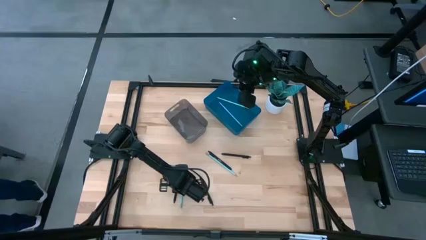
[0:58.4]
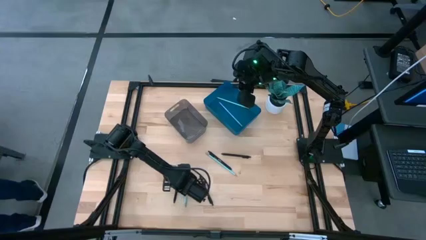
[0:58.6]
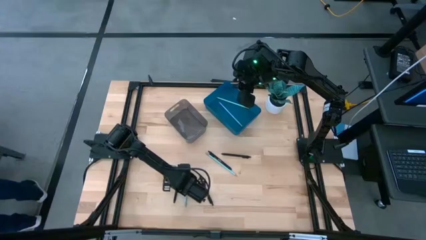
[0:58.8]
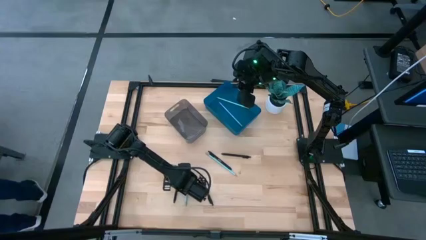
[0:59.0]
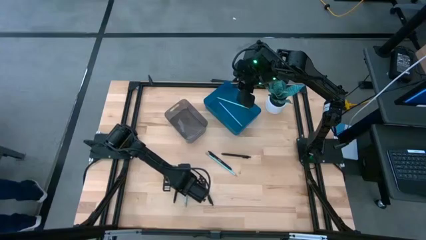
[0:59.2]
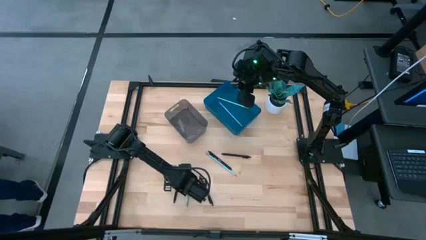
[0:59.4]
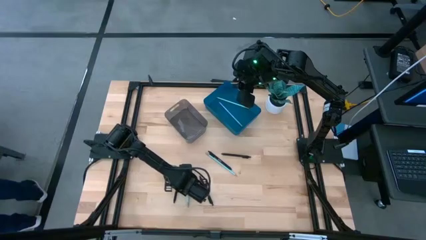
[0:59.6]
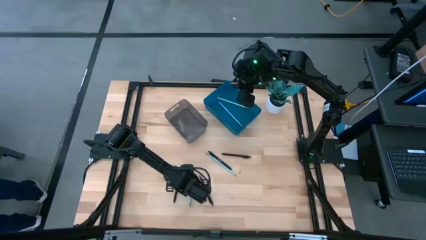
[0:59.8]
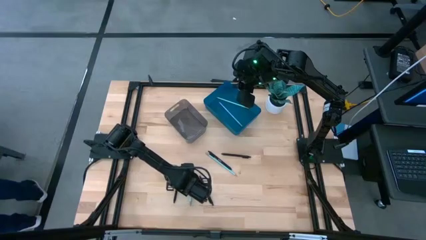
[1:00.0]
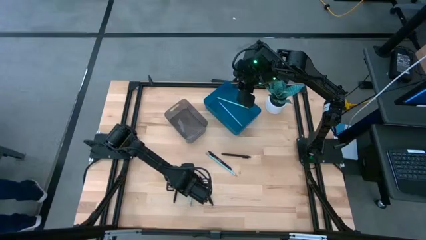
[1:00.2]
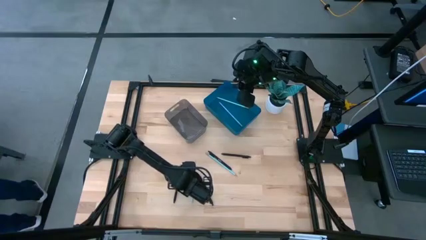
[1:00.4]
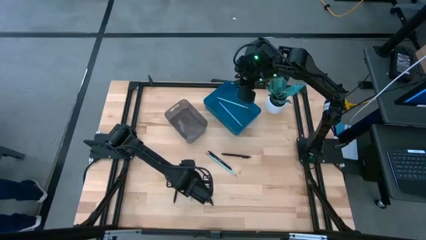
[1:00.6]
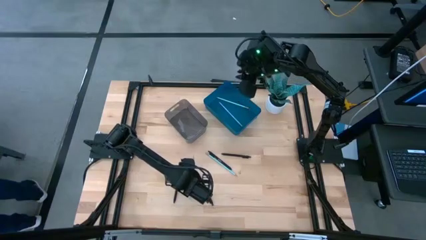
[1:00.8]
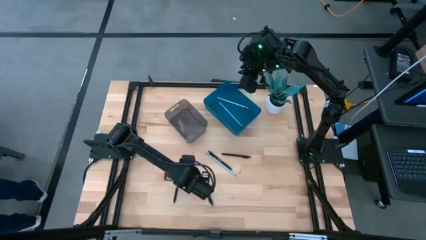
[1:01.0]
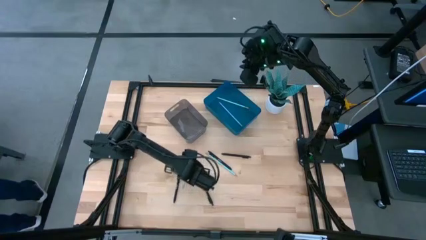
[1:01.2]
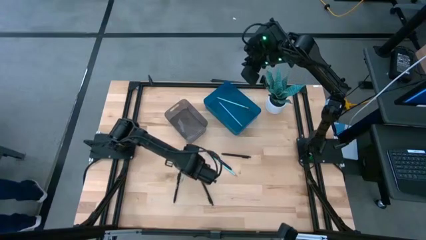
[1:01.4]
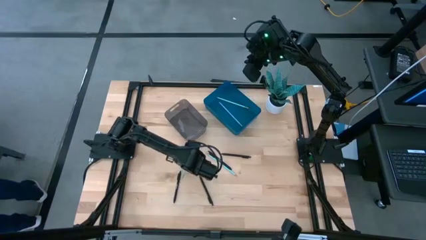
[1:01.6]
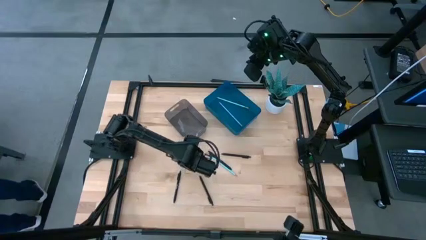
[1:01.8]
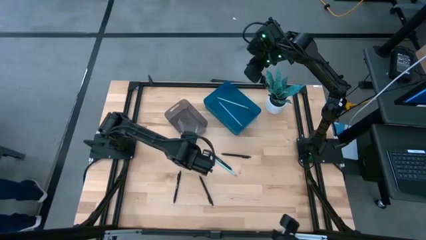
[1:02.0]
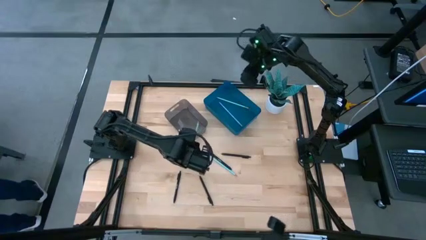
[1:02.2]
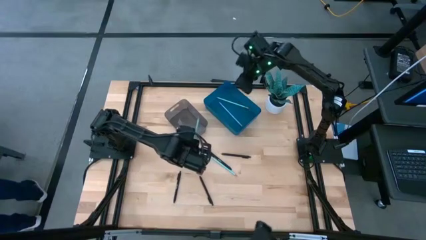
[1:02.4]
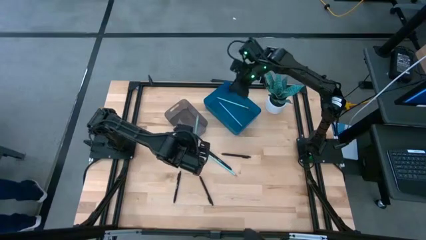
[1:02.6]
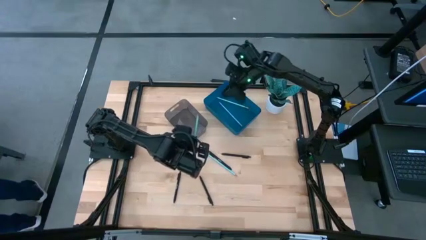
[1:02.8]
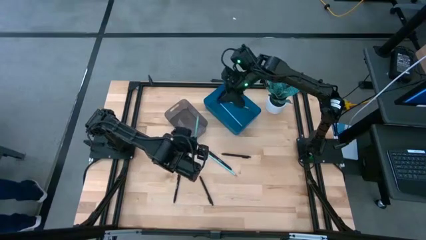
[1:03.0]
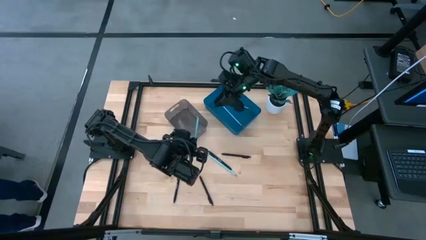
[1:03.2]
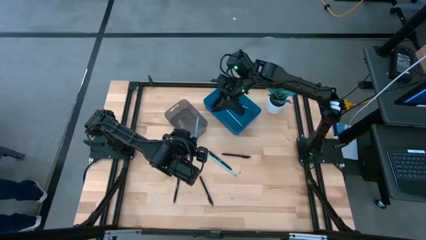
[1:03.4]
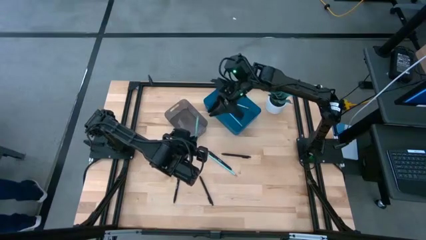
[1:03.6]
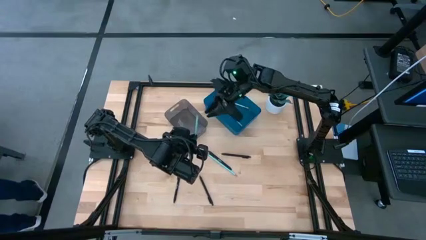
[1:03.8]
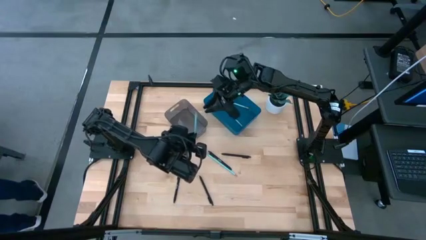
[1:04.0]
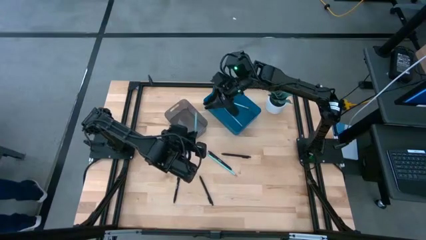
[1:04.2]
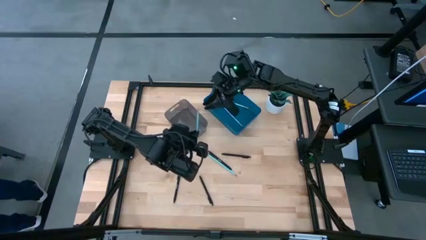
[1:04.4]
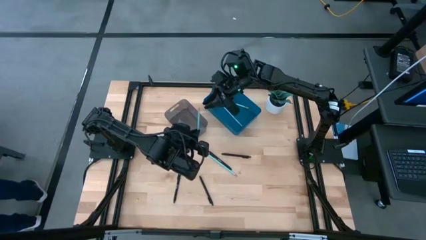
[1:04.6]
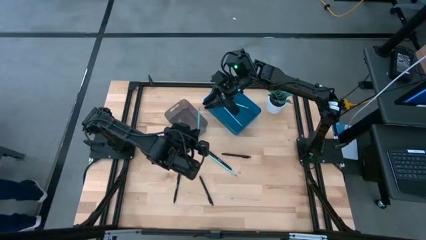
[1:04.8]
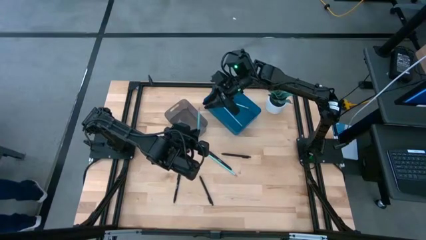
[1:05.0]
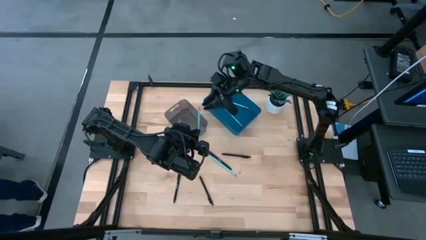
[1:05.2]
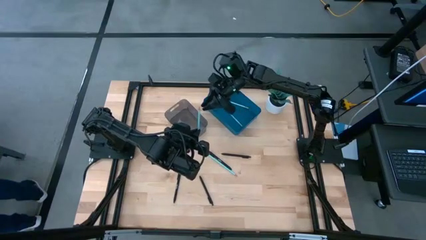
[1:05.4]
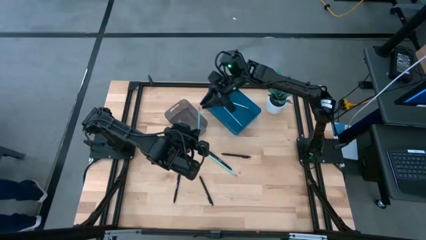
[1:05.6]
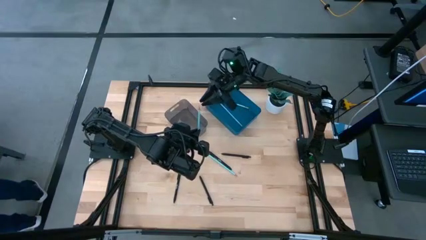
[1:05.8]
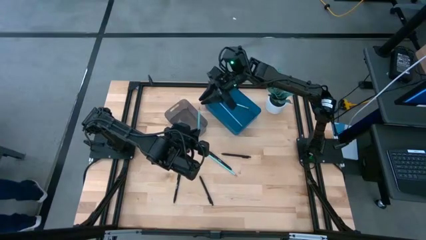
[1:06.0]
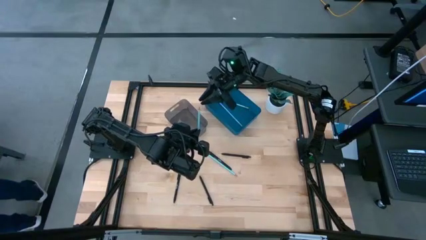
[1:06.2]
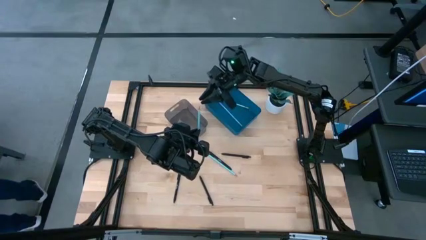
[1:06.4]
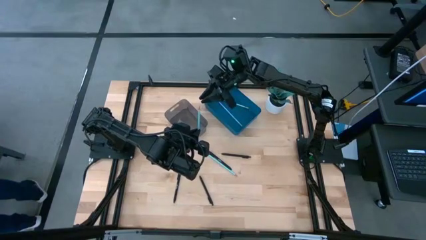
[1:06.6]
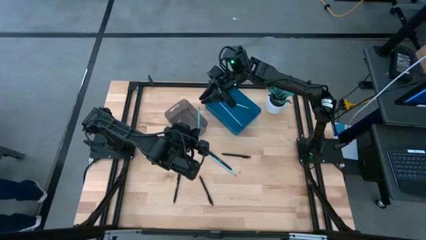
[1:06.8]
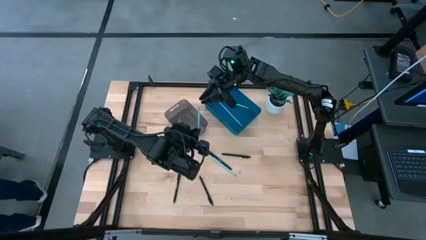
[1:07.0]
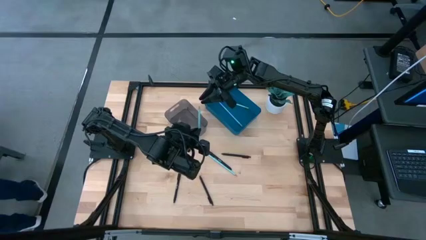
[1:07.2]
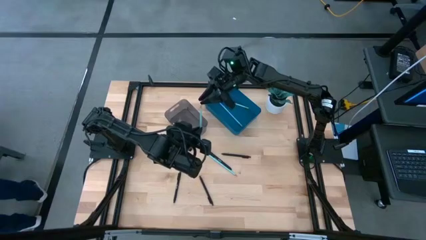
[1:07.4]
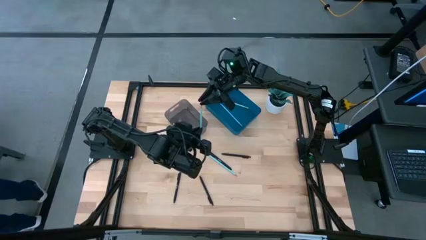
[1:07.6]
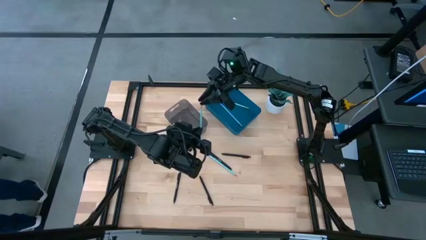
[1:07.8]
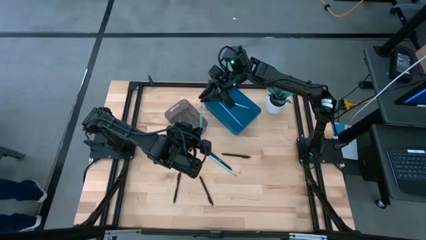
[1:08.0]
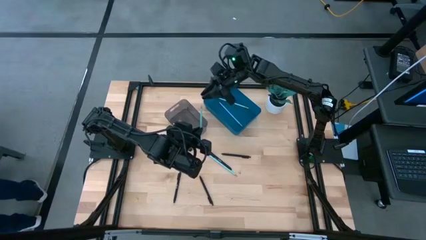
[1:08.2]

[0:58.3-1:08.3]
Task: Sort pens & pencils
Put the light blue pencil into the blue bin

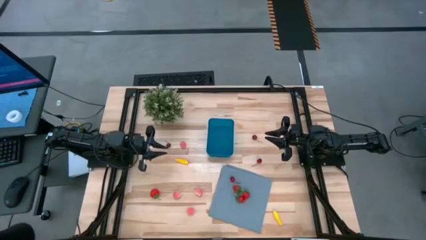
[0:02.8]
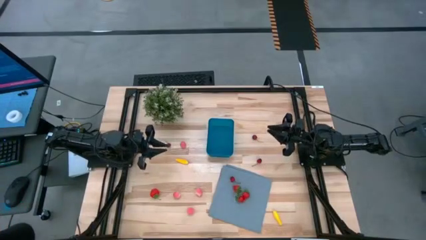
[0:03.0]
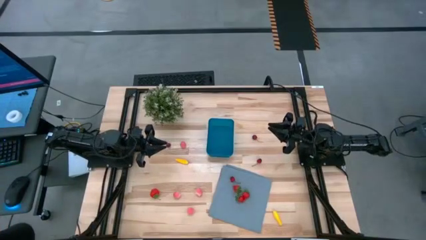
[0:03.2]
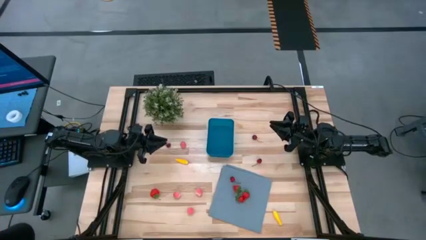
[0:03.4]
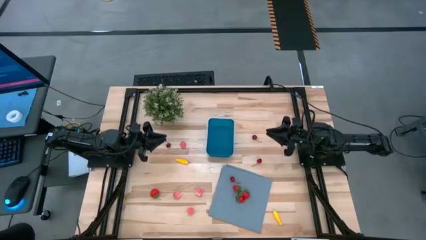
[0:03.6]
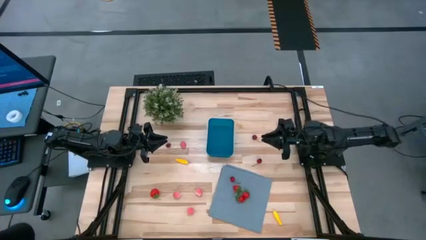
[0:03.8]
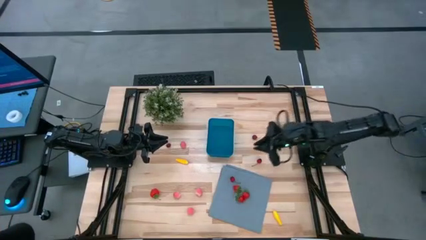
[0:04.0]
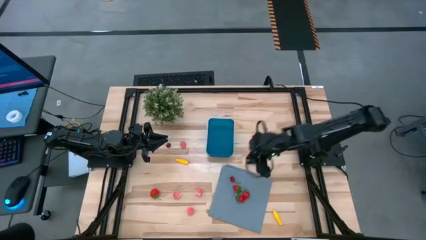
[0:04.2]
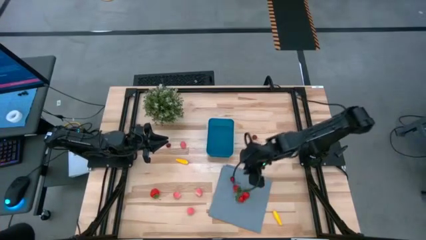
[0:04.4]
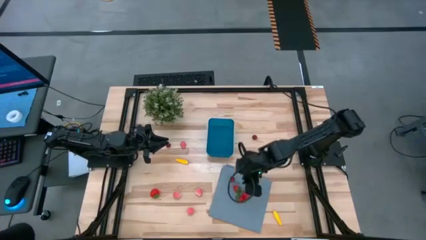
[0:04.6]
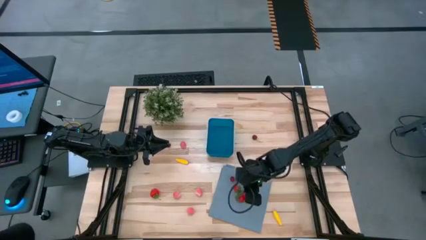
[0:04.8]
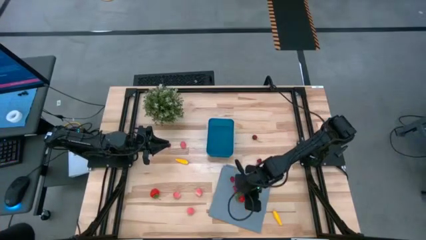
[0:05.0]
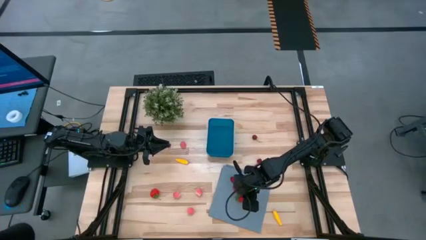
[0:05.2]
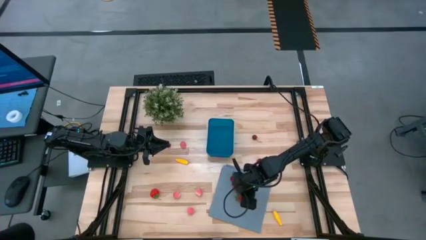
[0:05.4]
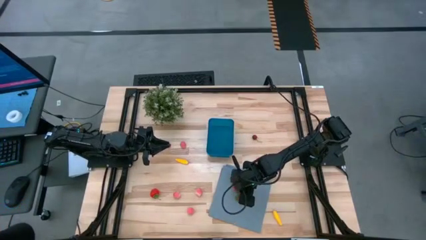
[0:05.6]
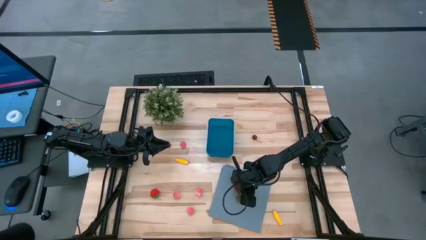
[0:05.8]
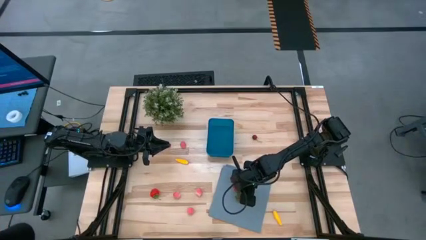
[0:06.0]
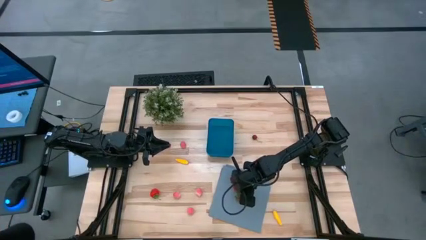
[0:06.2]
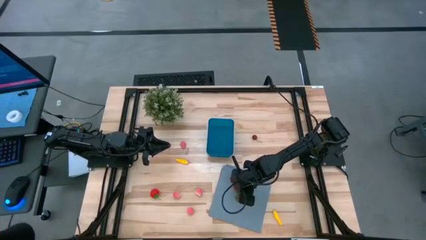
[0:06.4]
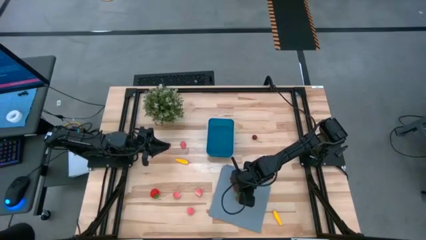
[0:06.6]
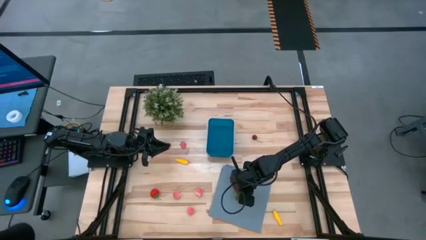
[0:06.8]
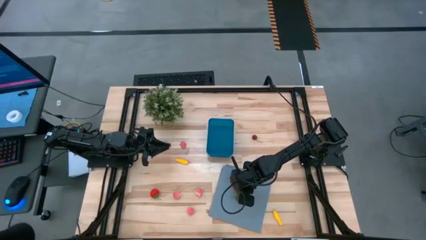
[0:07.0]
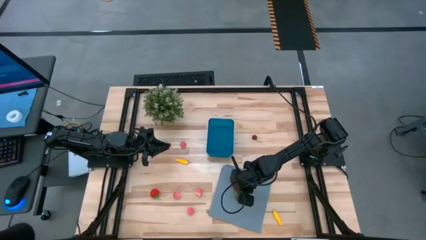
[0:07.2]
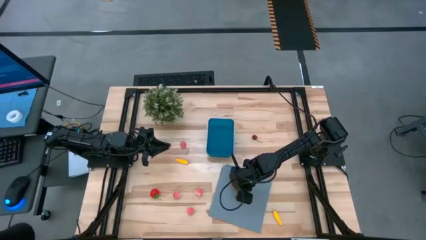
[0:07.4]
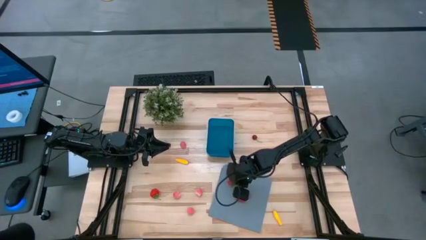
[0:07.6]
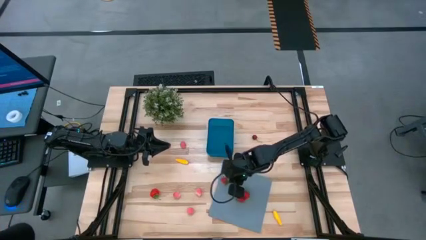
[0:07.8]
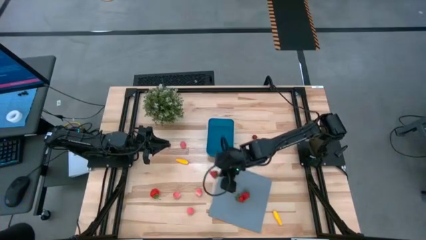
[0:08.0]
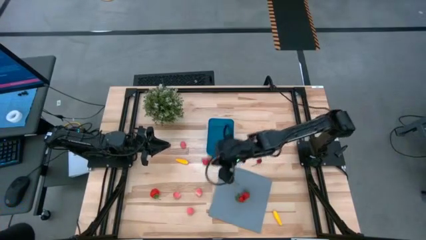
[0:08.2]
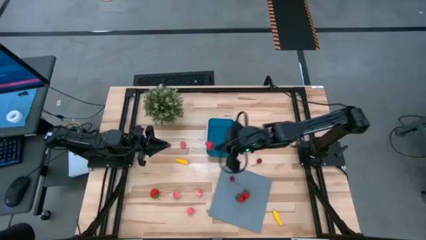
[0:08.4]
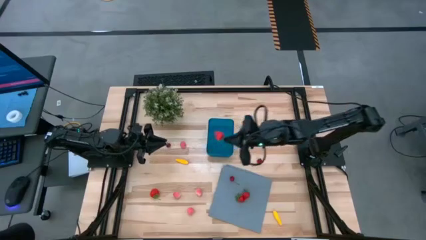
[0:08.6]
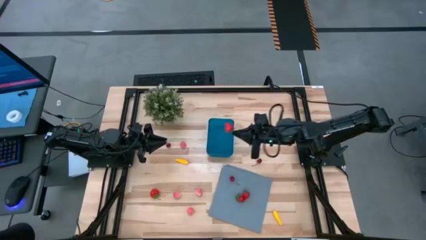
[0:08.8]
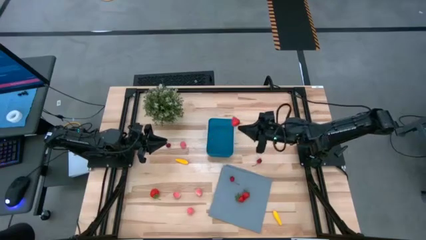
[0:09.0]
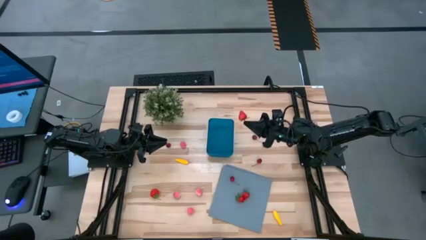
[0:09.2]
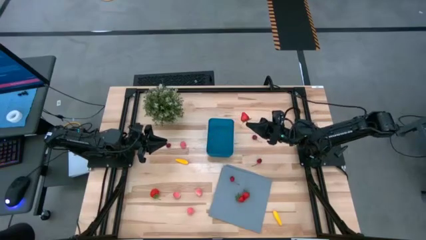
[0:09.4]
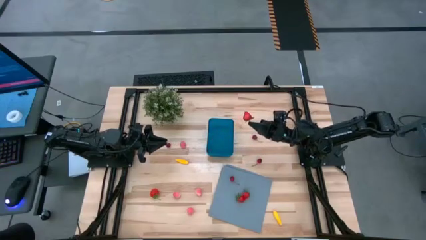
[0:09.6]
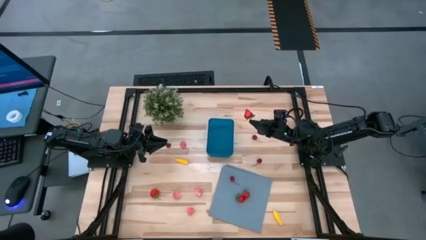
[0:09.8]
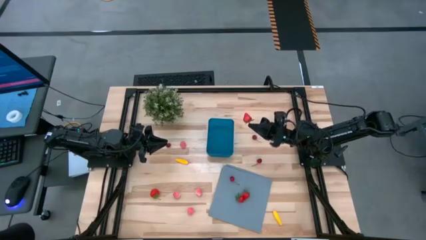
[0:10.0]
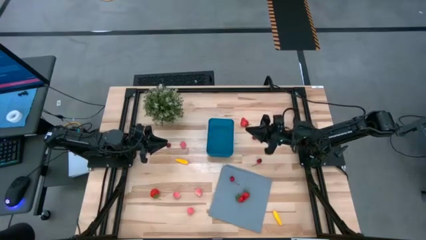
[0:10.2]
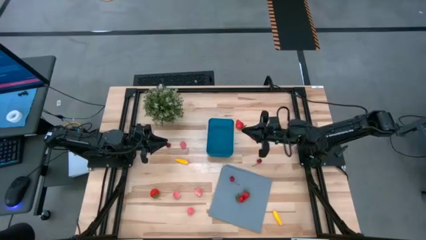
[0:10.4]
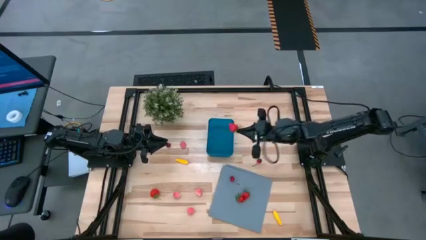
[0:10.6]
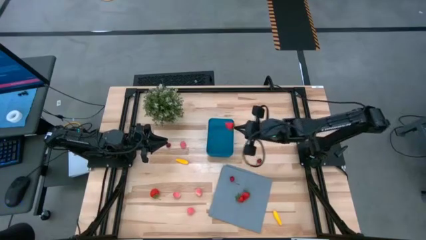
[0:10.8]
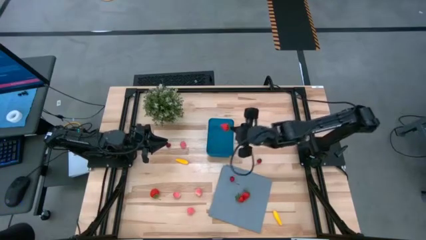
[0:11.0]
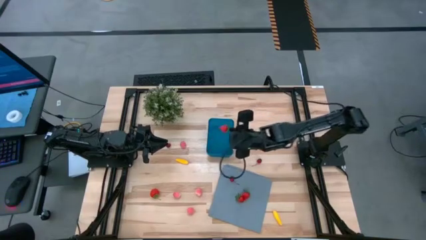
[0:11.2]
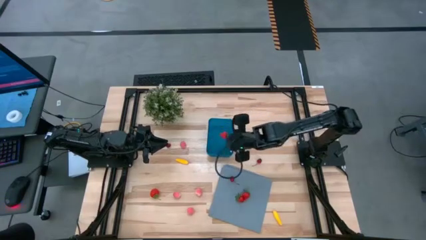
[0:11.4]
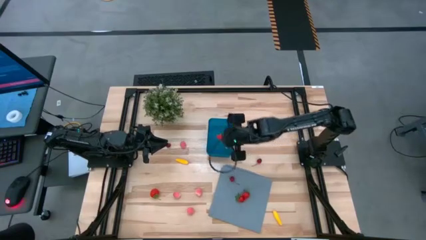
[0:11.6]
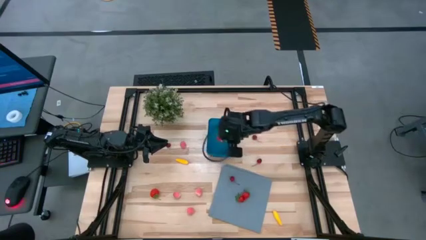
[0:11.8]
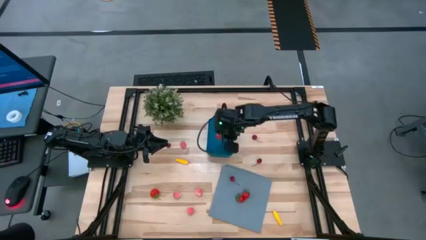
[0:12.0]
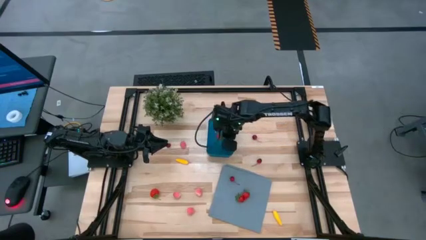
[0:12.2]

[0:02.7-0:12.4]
Task: Pick and placing Produce into tupperware
Put the strawberry into the blue bin
